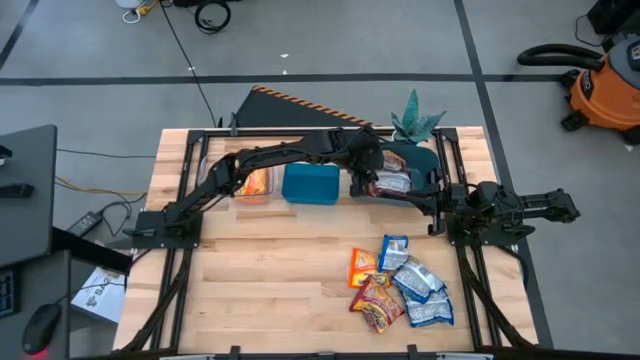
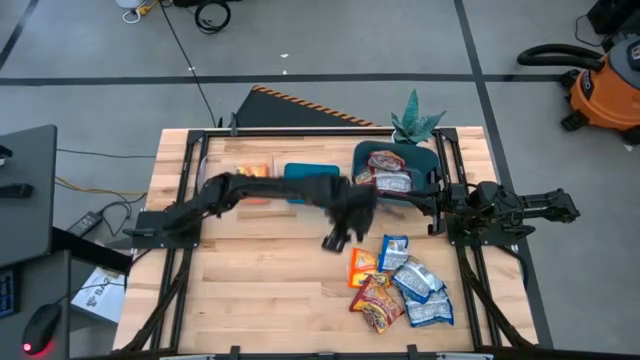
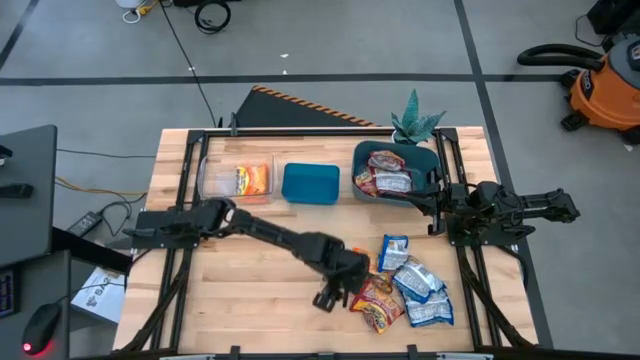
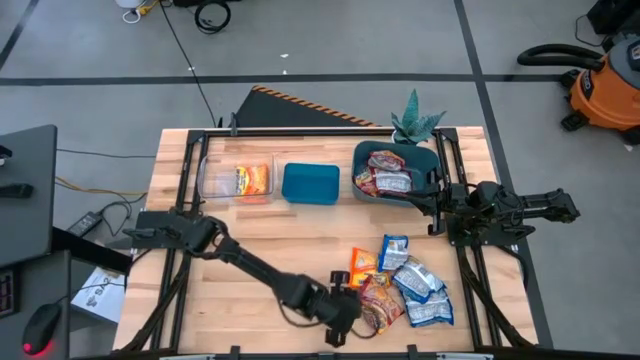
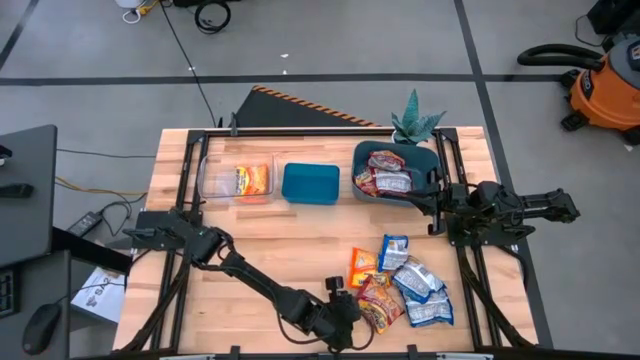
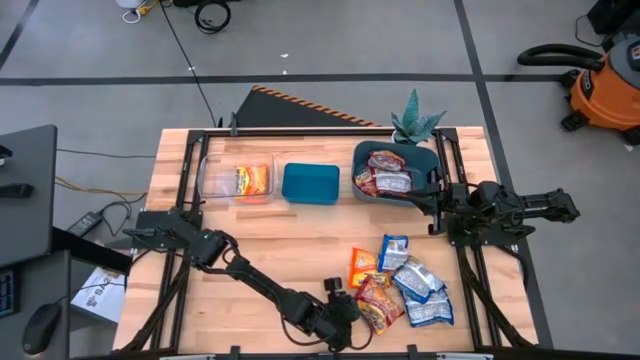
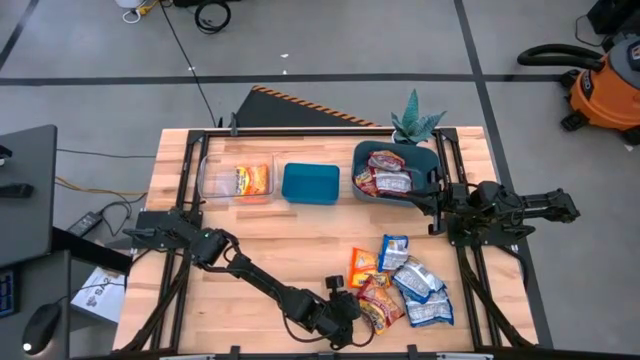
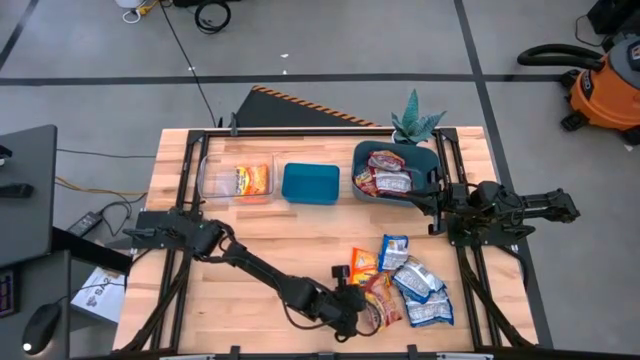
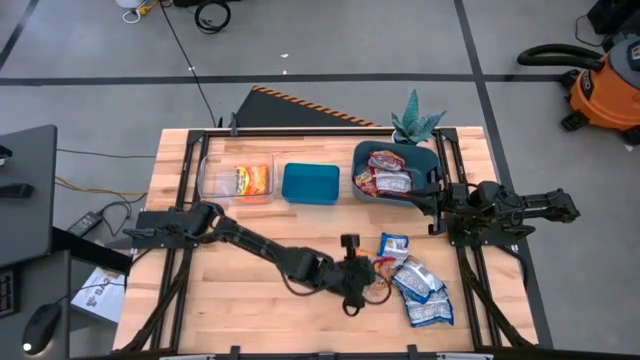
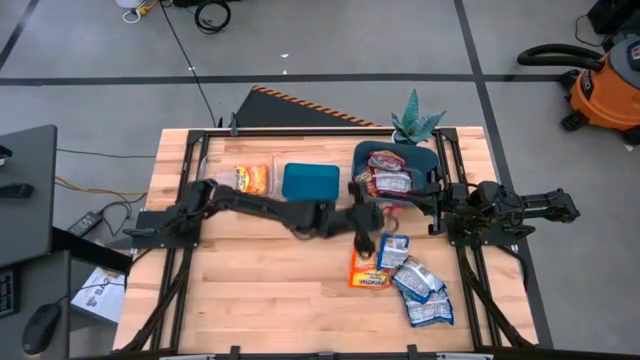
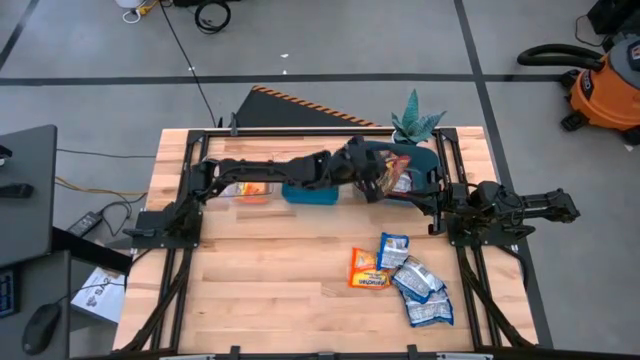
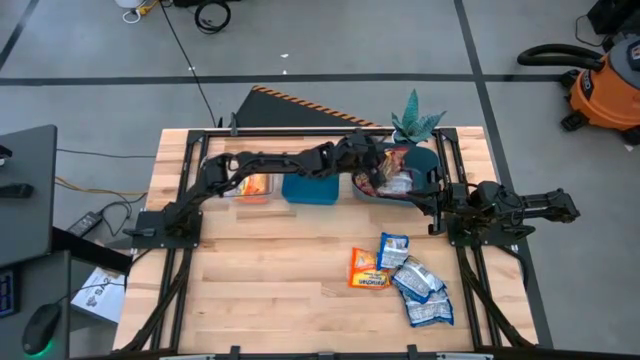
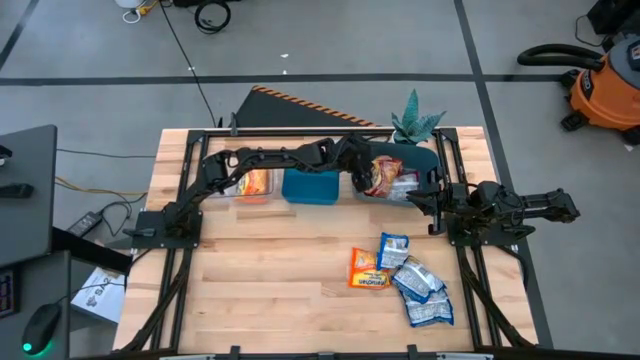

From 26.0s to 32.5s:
Task: Sort Maruchan noodles
Put the red noodle pack into the dark blue bin

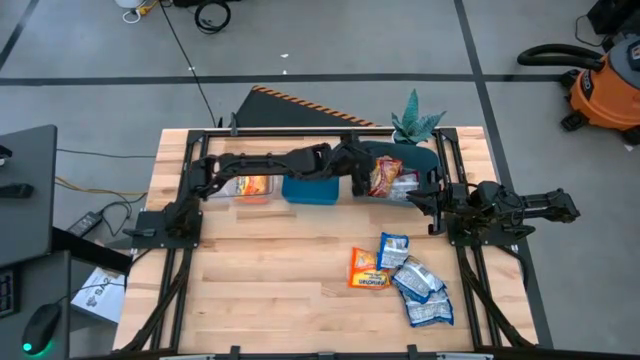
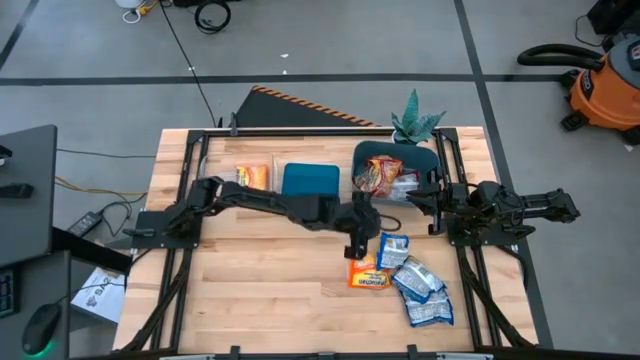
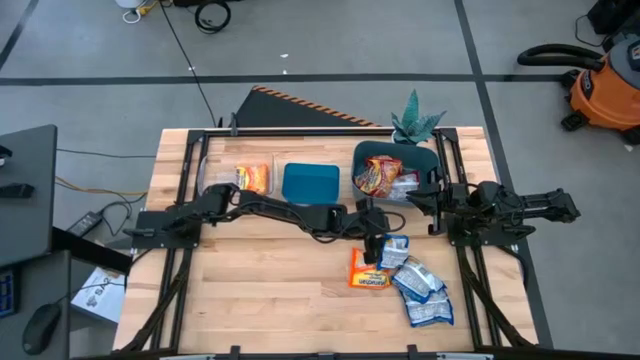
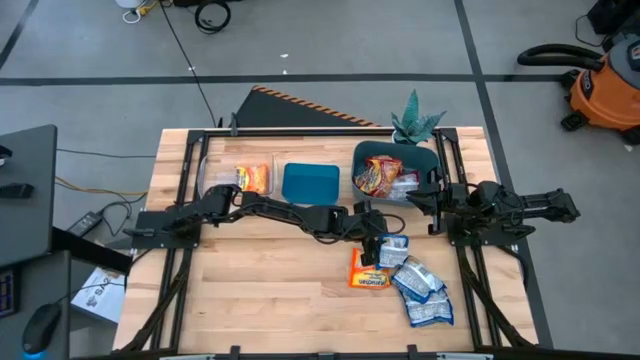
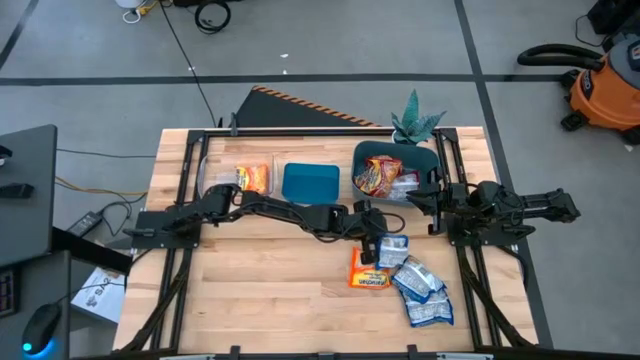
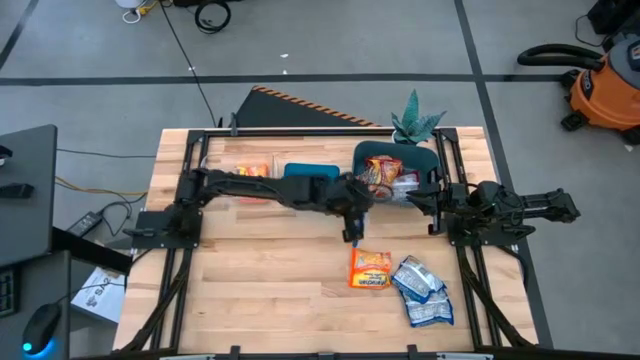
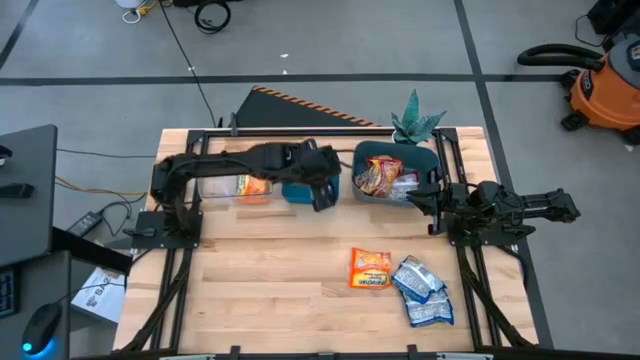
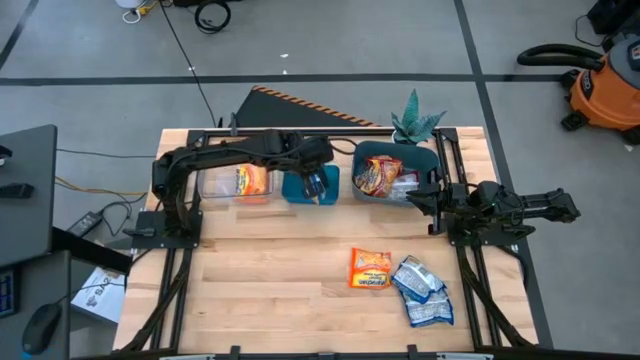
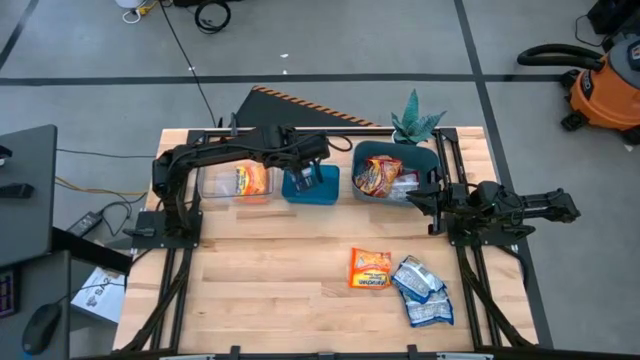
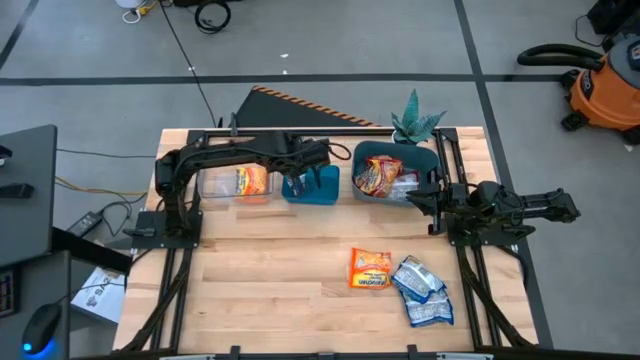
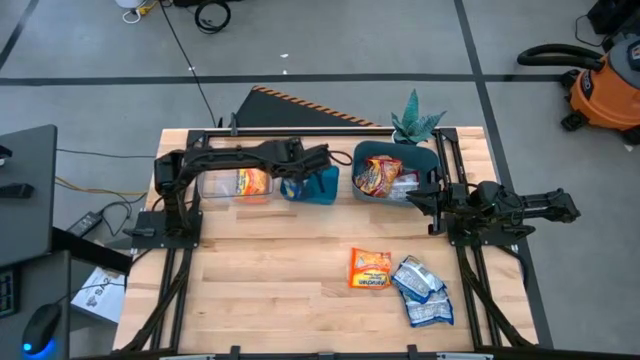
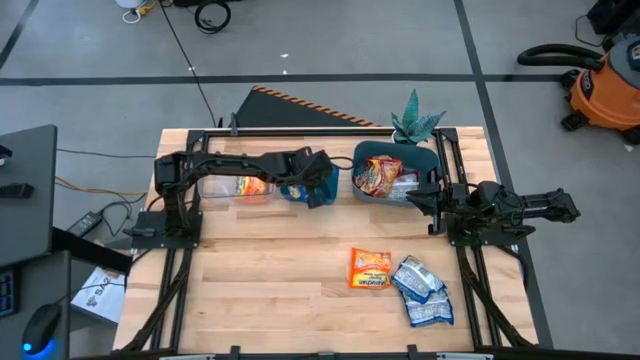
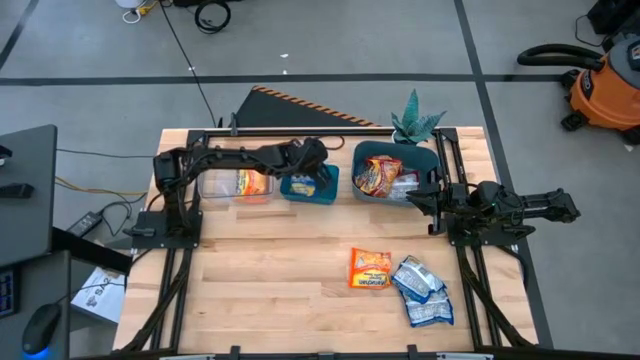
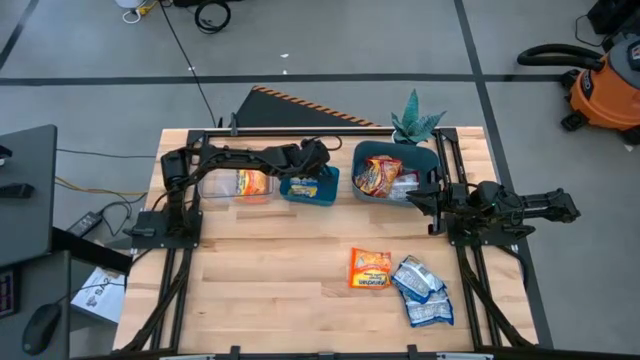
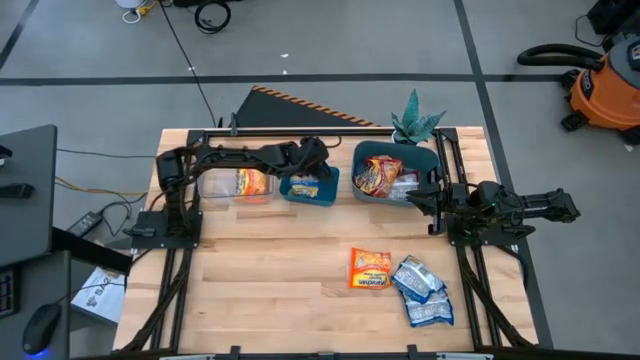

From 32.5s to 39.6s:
Put the blue noodle pack into the blue bin

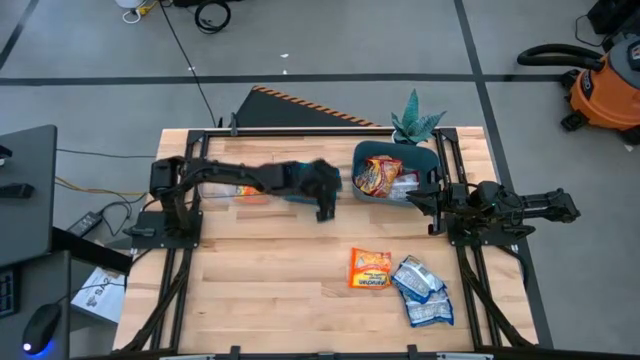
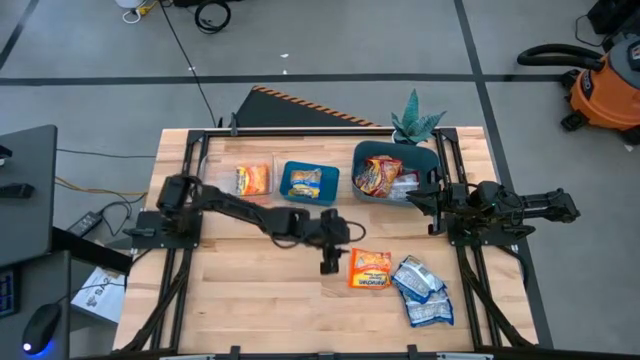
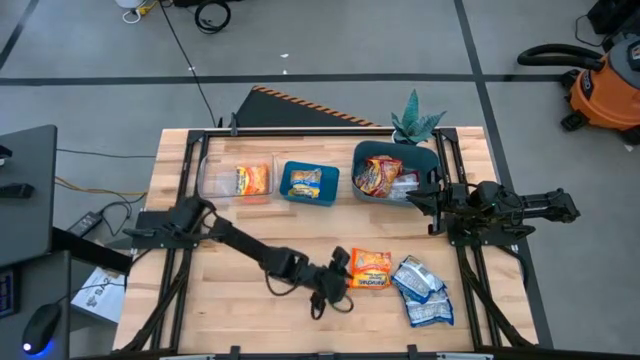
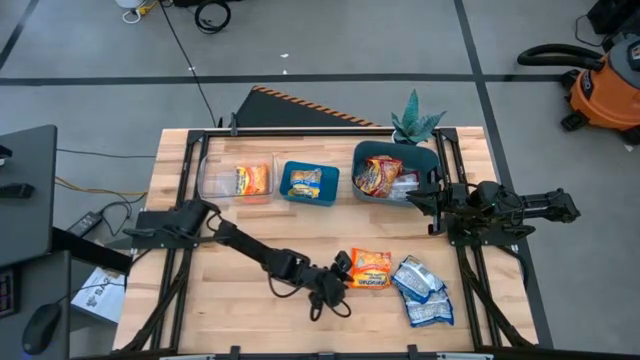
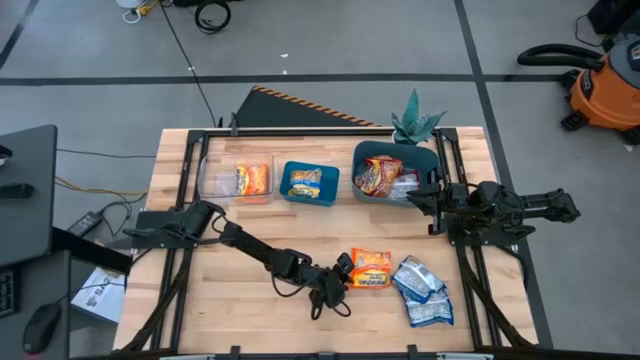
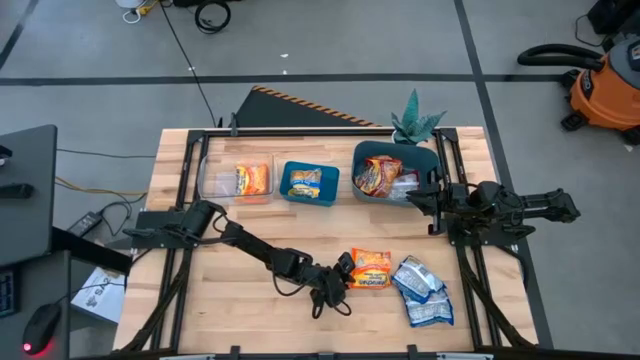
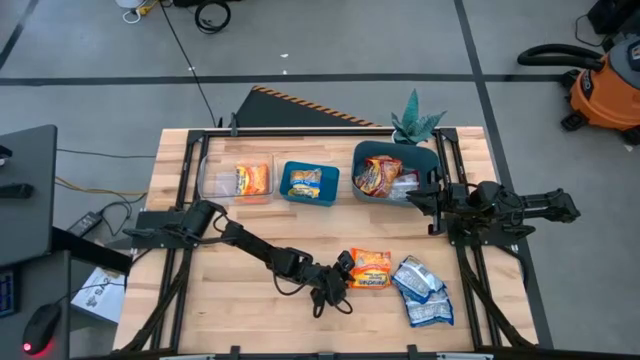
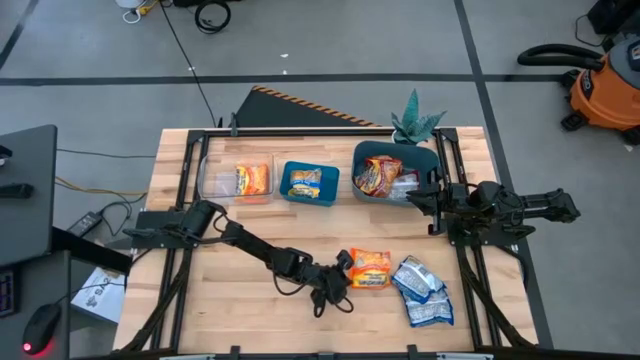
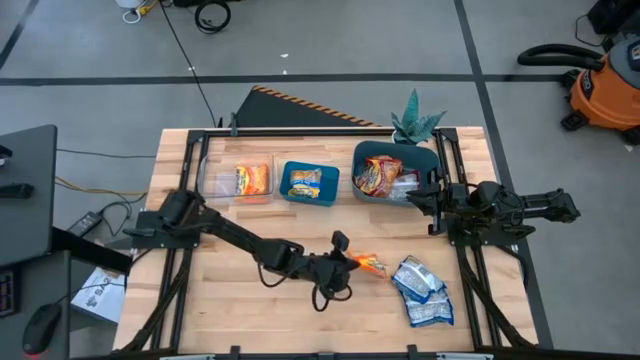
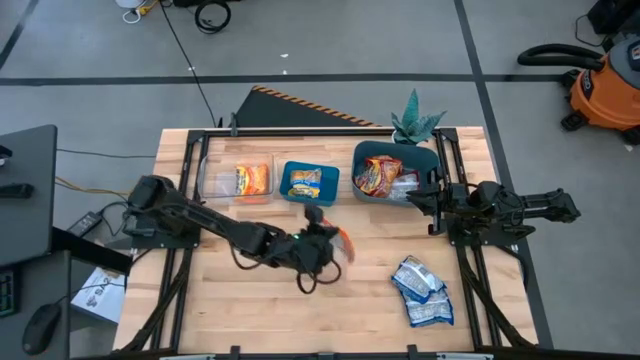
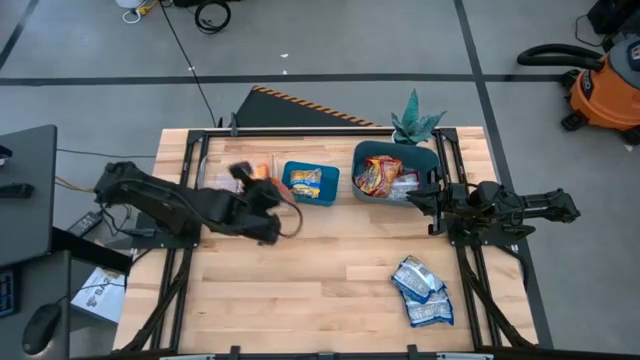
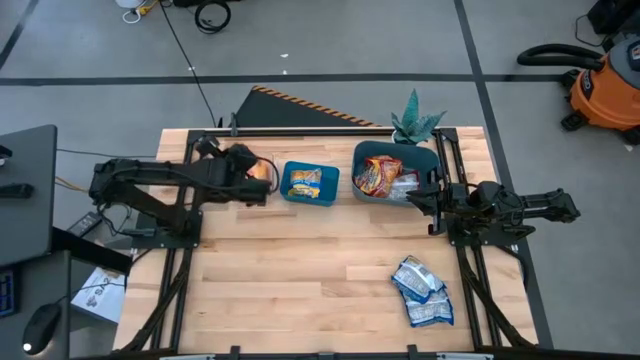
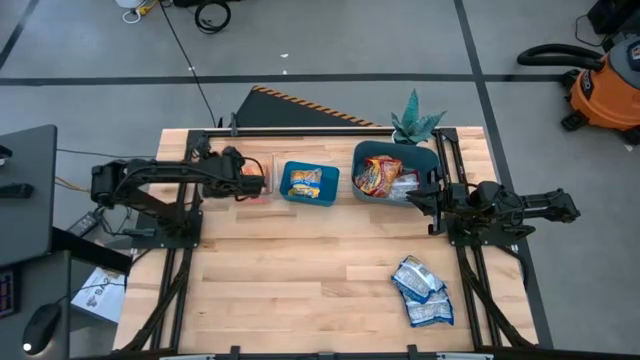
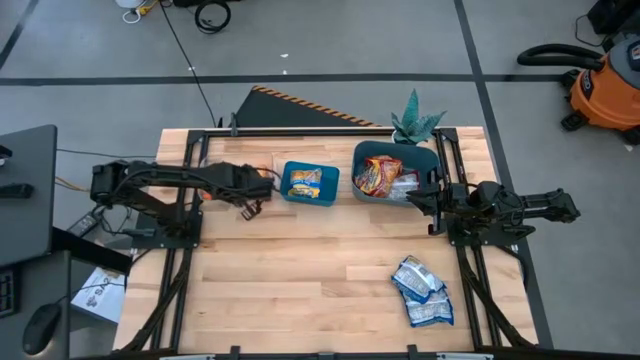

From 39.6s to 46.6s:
Put the orange noodle pack into the transparent bin
